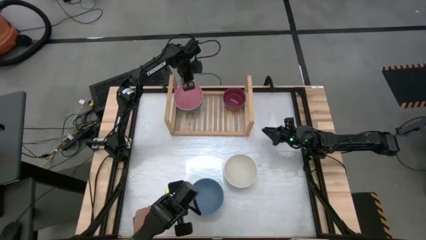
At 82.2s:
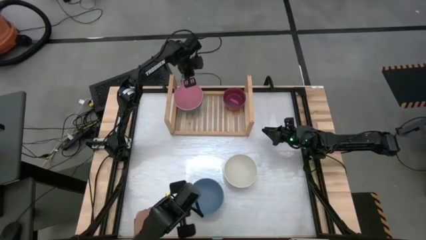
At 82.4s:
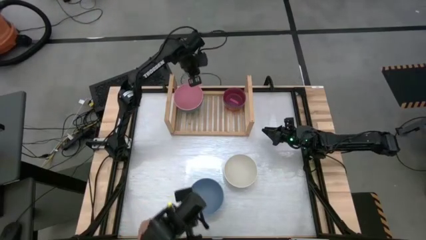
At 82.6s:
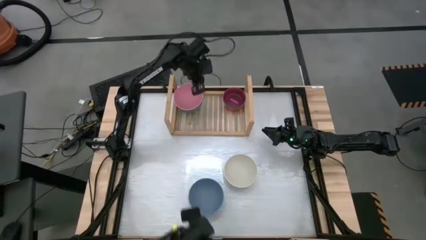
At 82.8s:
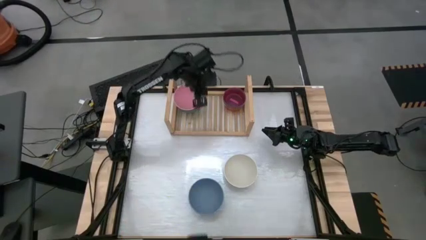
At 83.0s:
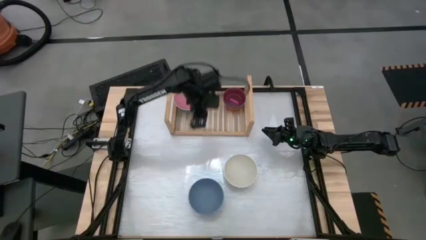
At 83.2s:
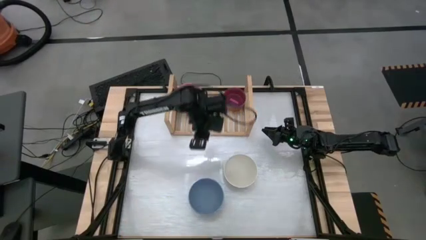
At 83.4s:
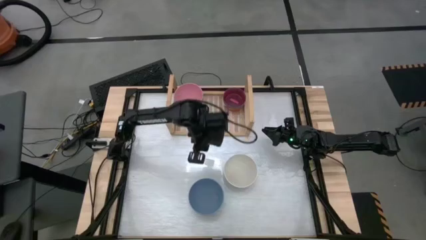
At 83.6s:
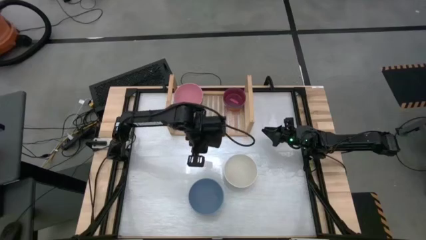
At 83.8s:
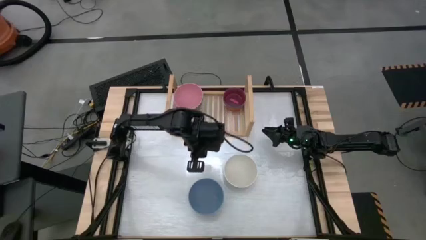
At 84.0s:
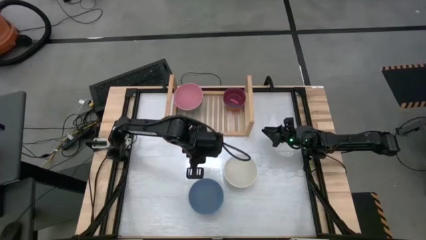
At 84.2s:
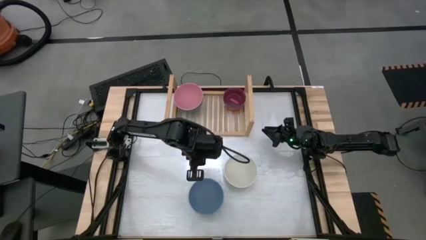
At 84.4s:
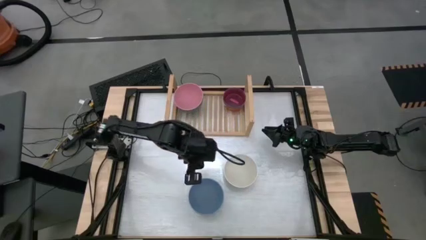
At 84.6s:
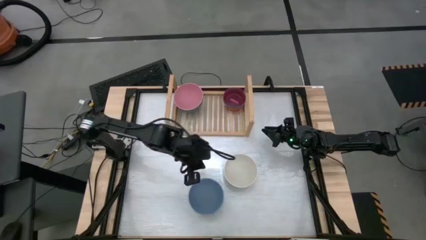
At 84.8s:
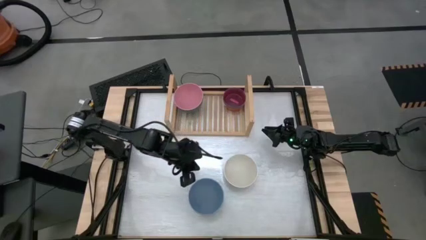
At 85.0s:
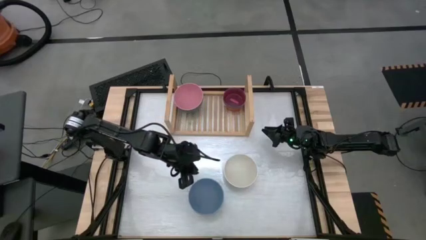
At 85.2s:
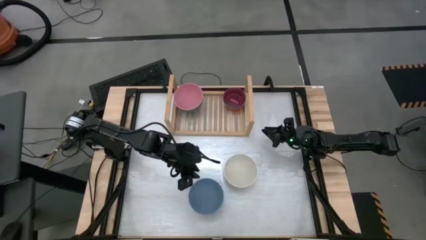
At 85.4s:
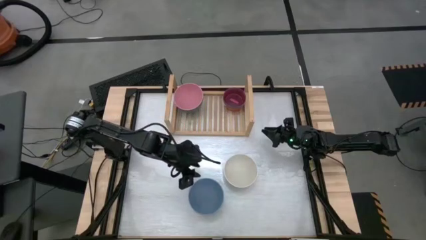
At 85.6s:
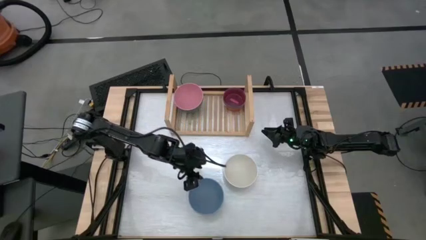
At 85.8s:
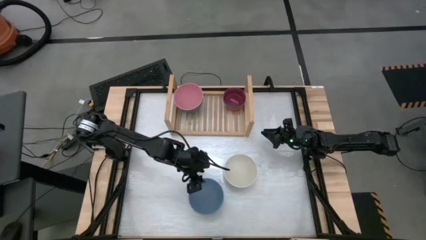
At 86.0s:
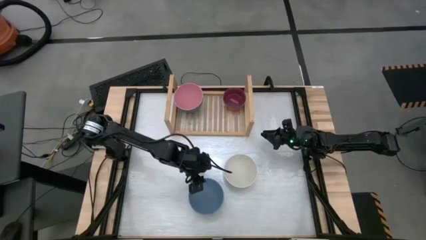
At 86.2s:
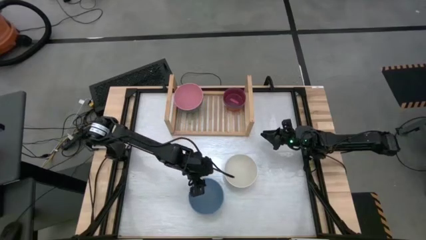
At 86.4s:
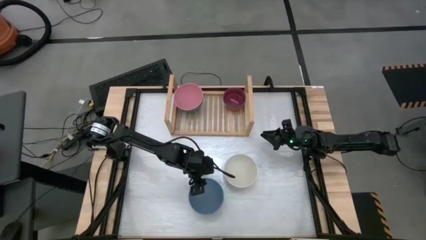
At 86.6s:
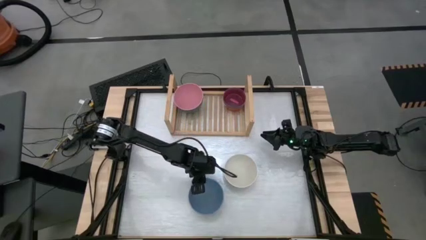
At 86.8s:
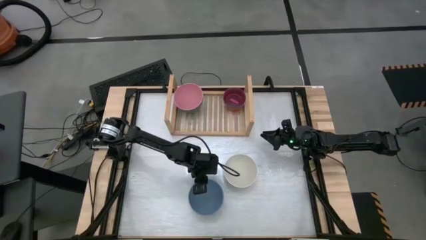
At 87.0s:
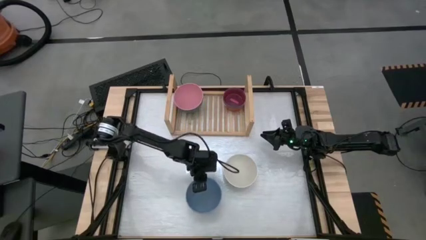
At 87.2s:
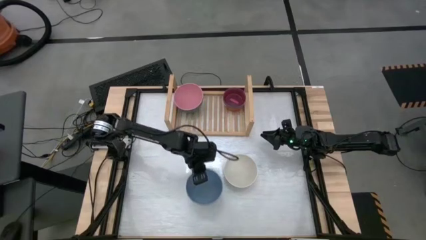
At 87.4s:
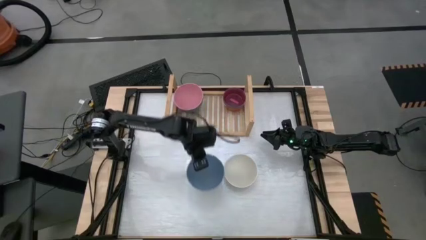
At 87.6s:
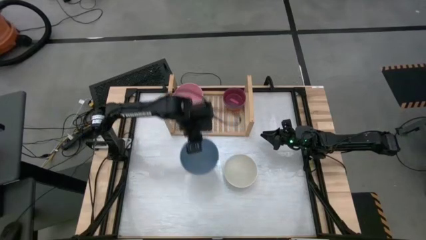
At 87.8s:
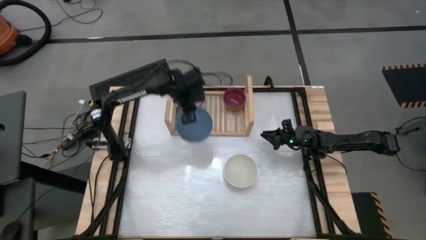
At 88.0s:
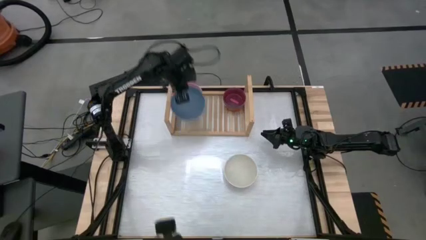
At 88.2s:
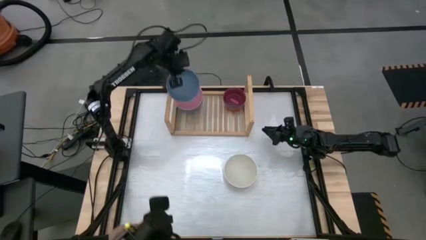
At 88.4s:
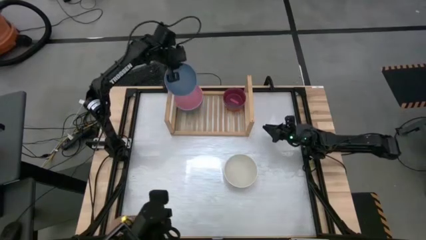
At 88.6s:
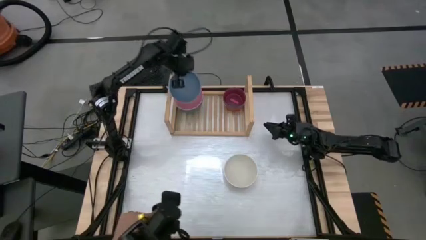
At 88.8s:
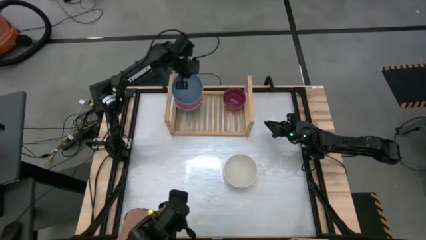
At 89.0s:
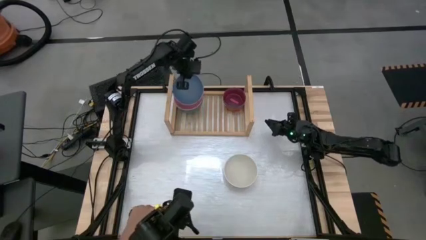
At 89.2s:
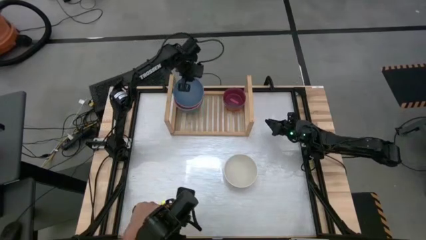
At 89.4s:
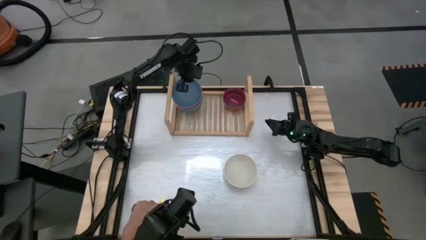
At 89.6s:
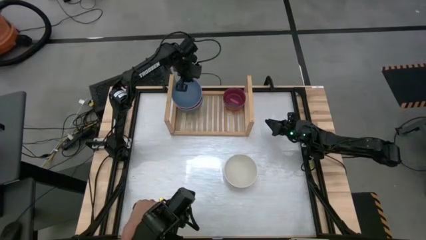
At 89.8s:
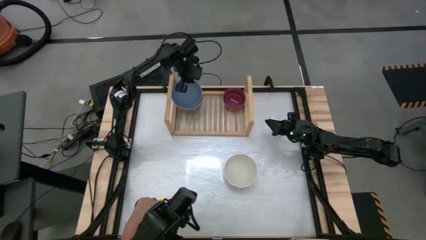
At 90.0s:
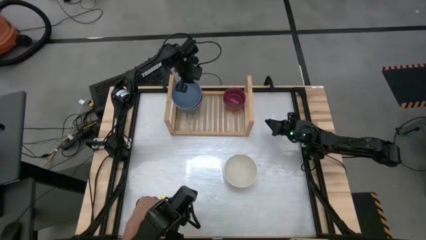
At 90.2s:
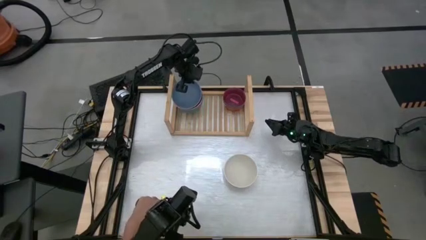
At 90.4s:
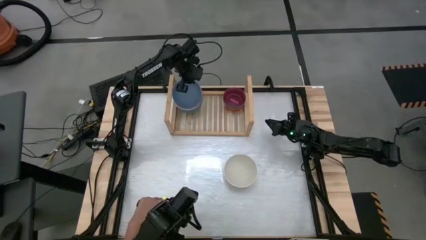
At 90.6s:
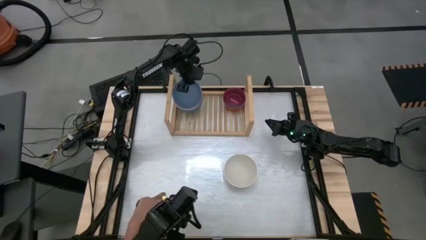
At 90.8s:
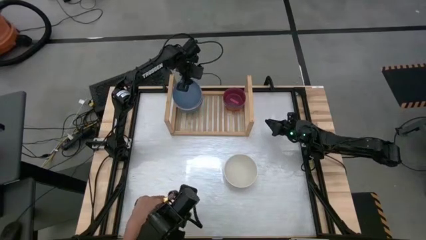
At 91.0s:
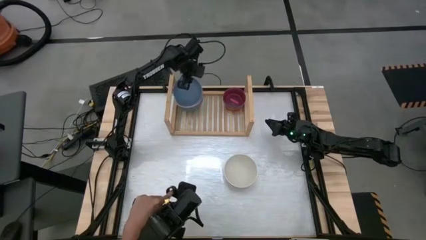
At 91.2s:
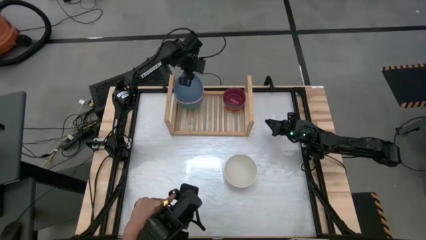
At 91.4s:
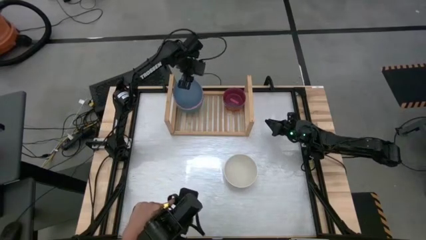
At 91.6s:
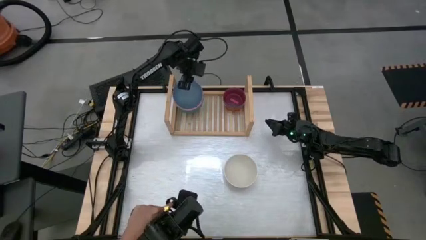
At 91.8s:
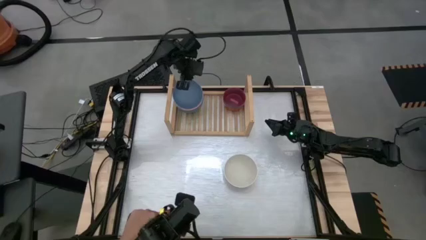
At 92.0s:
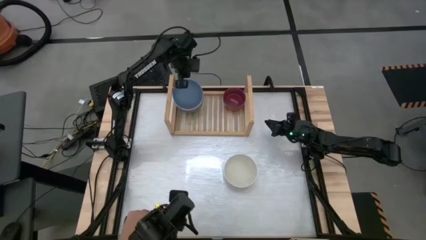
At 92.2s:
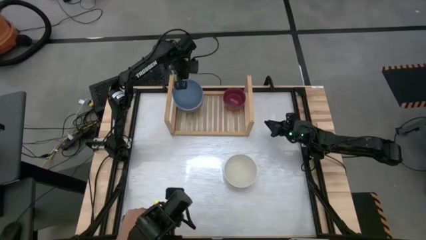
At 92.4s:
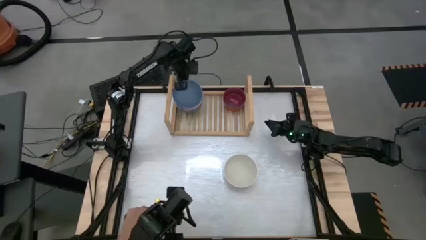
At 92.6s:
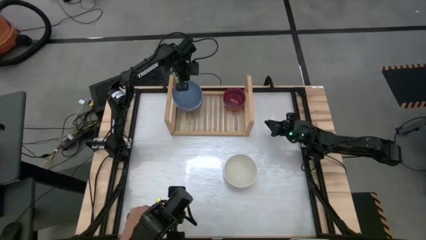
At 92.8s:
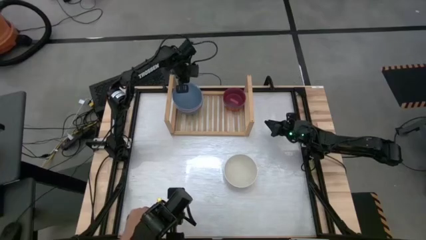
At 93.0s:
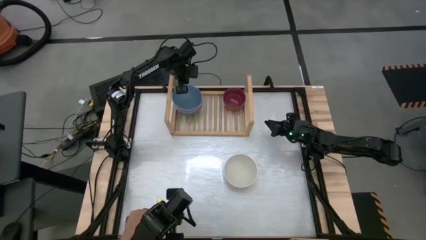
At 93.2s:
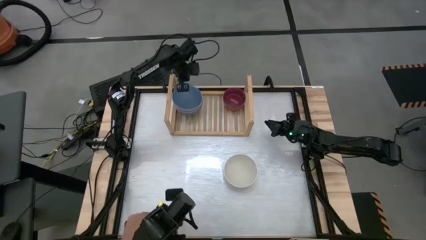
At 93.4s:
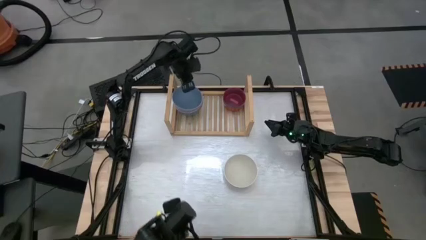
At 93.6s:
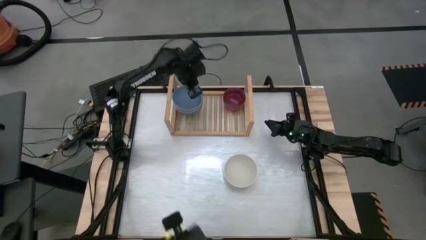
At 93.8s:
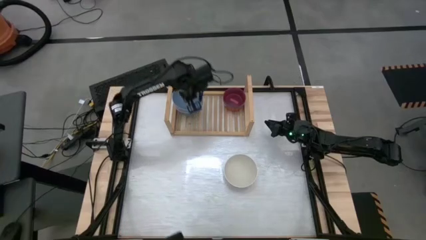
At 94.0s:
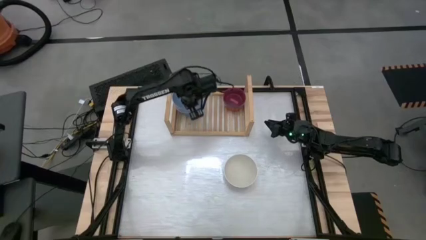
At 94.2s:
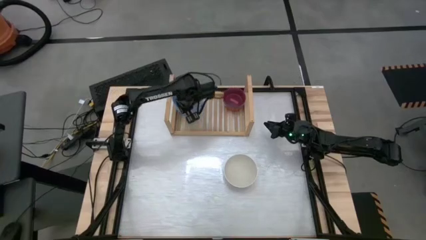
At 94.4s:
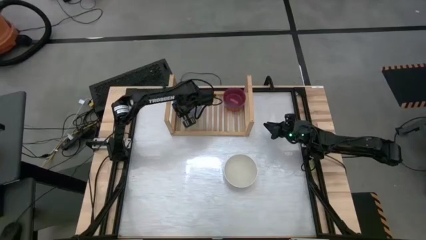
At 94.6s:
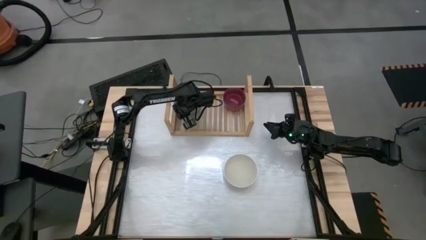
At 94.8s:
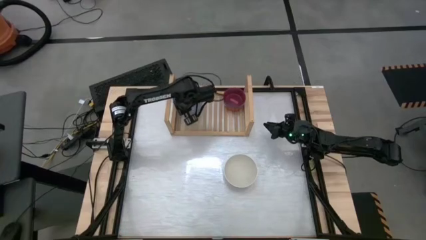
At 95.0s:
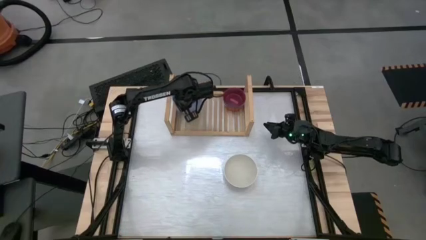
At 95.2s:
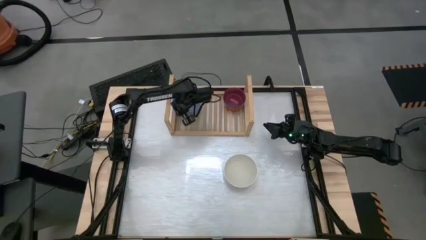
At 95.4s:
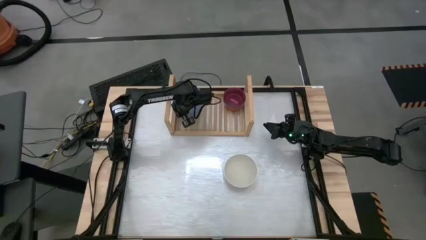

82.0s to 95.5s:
Task: Place and stack bowls onto a shelf
Stack the large blue bowl on top of the large pink bowl on the shelf
